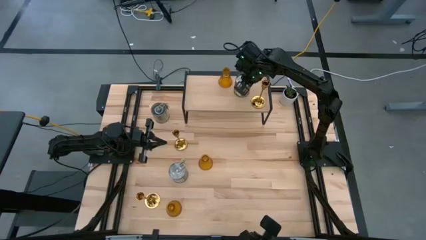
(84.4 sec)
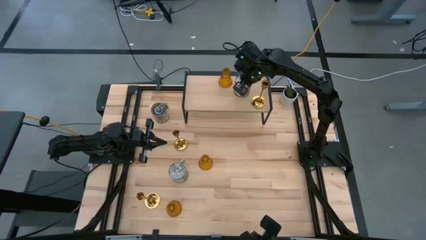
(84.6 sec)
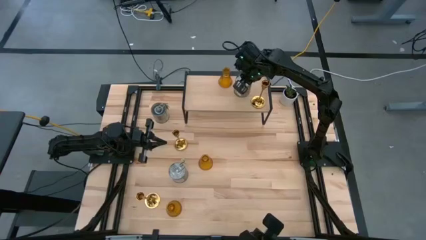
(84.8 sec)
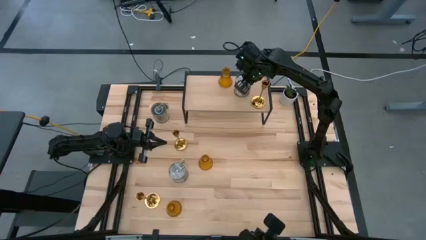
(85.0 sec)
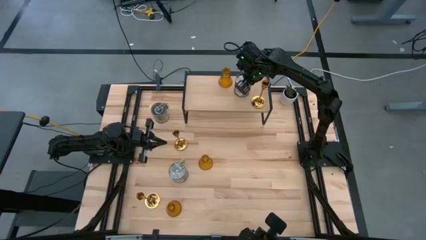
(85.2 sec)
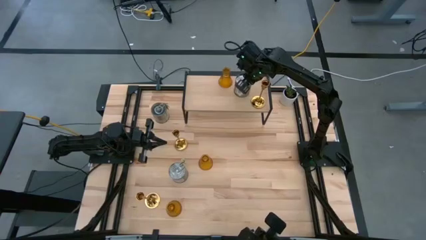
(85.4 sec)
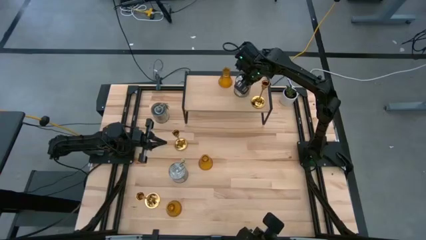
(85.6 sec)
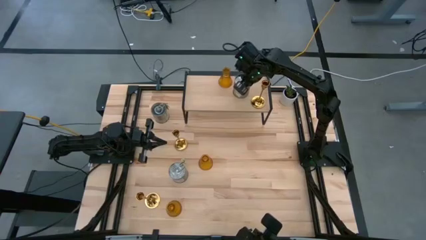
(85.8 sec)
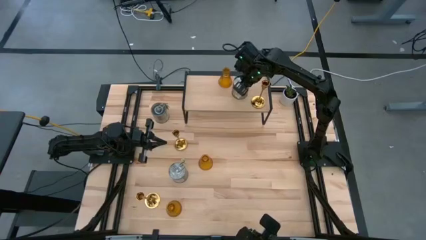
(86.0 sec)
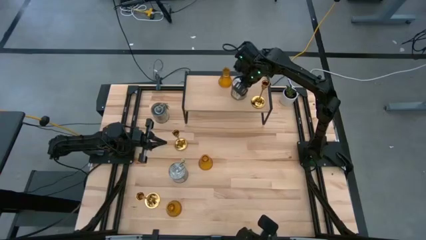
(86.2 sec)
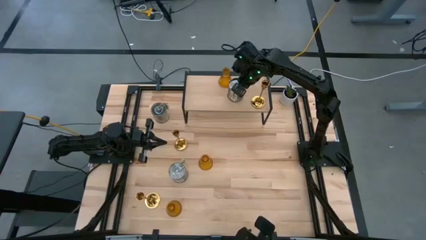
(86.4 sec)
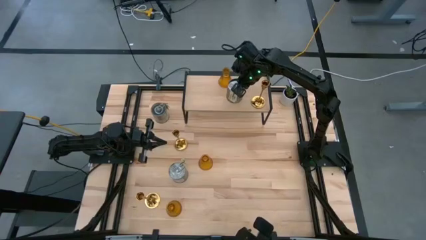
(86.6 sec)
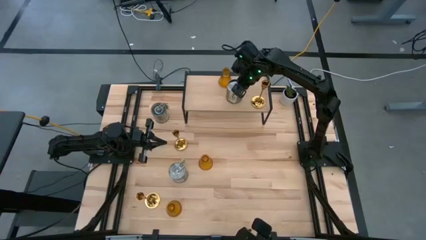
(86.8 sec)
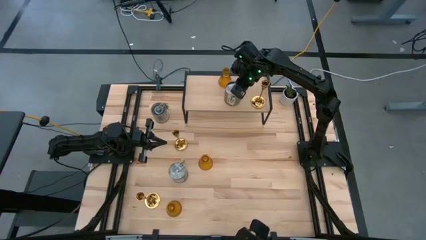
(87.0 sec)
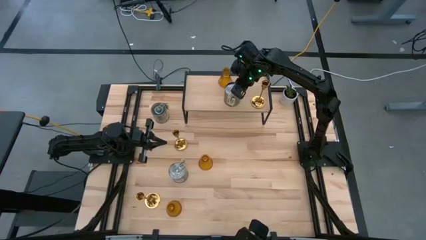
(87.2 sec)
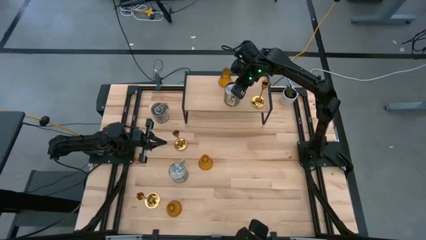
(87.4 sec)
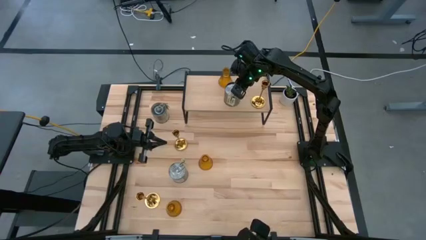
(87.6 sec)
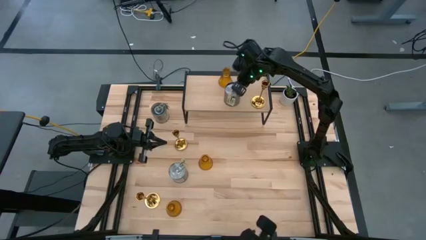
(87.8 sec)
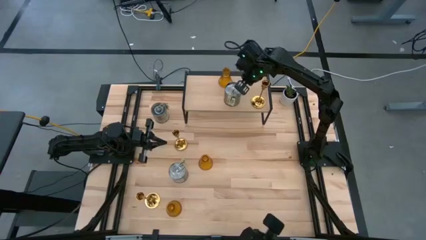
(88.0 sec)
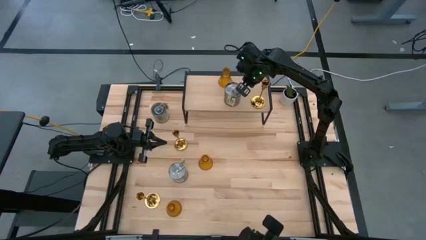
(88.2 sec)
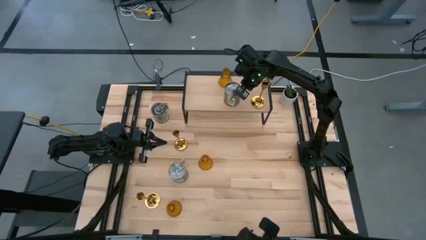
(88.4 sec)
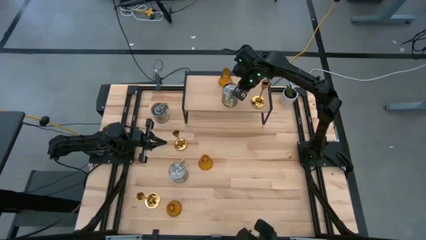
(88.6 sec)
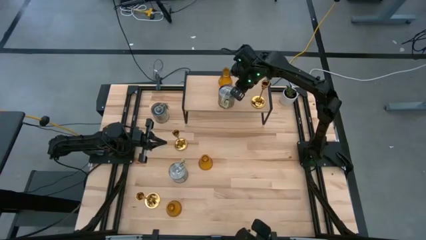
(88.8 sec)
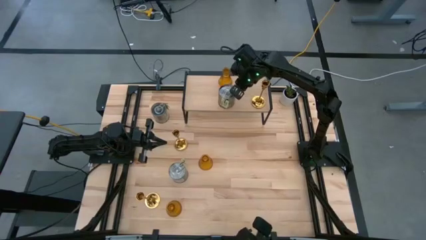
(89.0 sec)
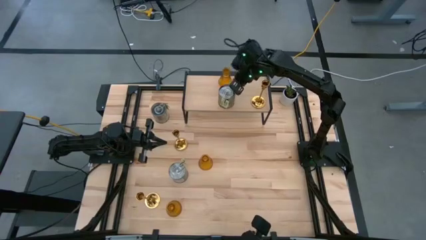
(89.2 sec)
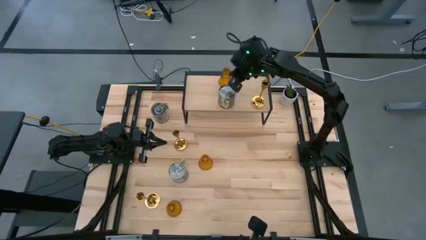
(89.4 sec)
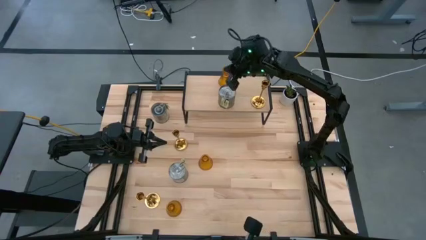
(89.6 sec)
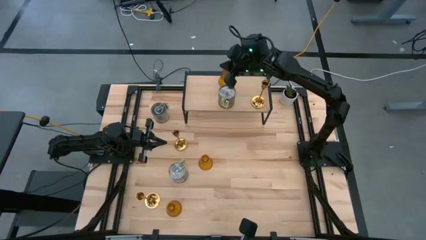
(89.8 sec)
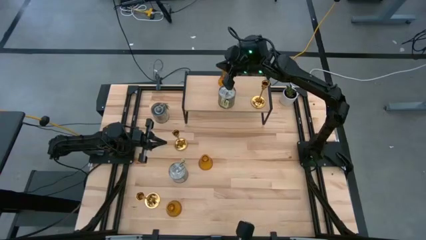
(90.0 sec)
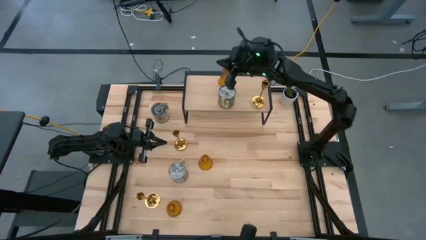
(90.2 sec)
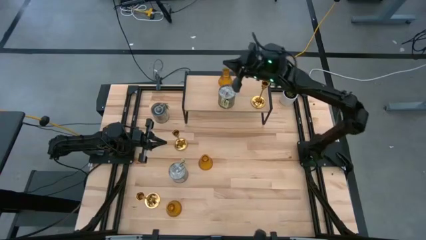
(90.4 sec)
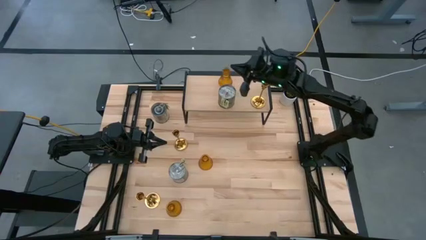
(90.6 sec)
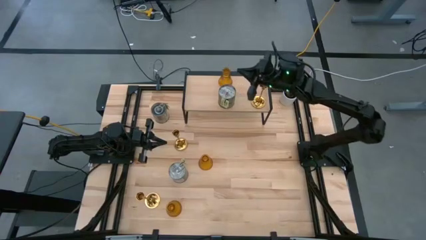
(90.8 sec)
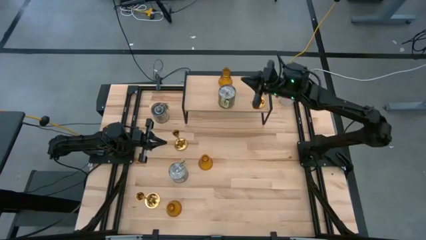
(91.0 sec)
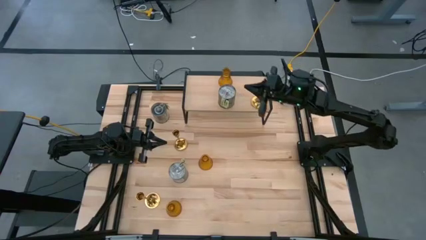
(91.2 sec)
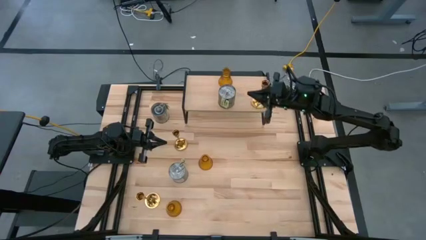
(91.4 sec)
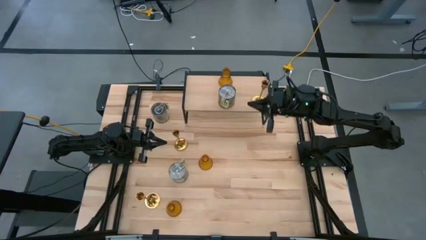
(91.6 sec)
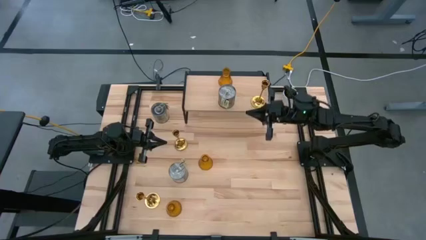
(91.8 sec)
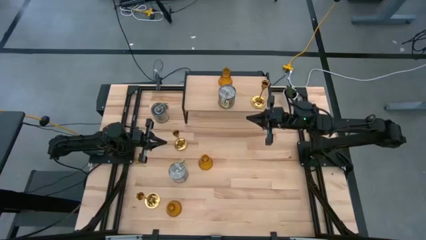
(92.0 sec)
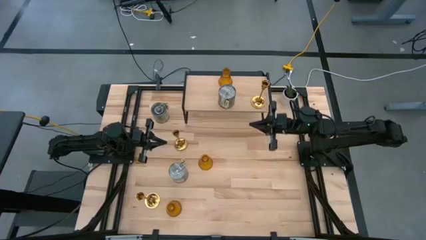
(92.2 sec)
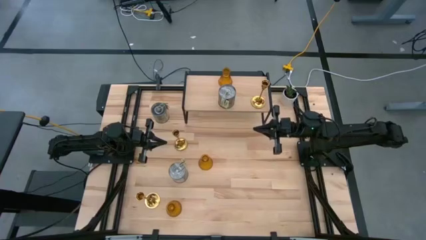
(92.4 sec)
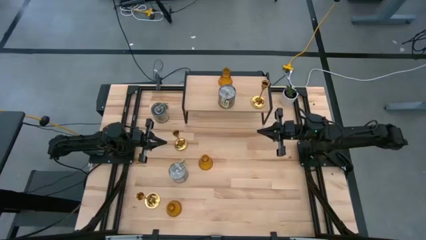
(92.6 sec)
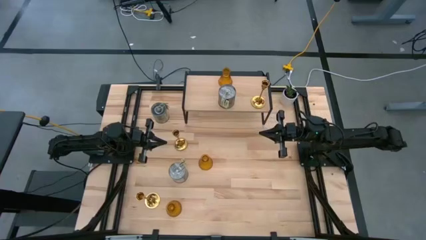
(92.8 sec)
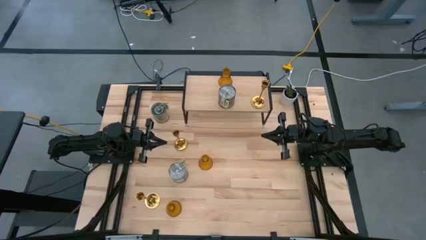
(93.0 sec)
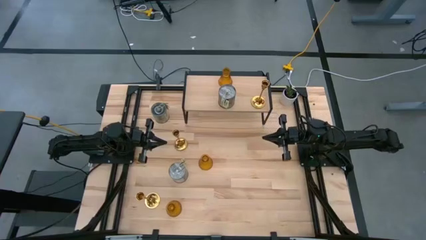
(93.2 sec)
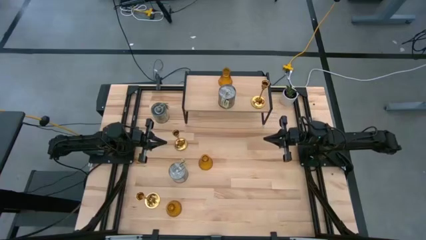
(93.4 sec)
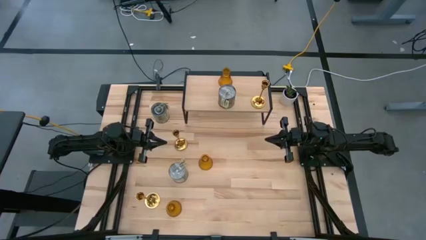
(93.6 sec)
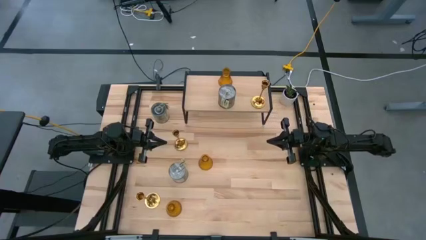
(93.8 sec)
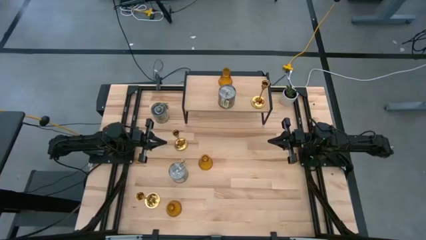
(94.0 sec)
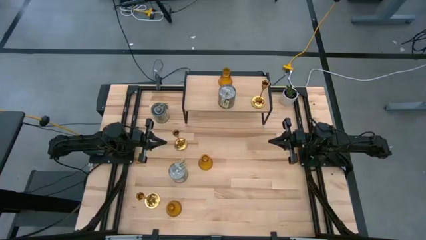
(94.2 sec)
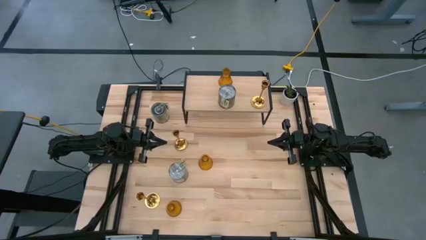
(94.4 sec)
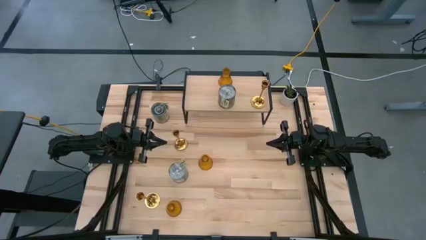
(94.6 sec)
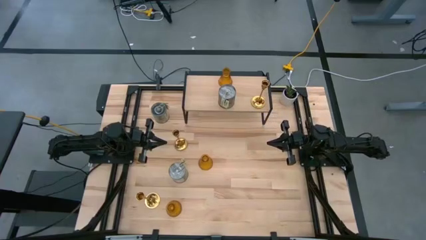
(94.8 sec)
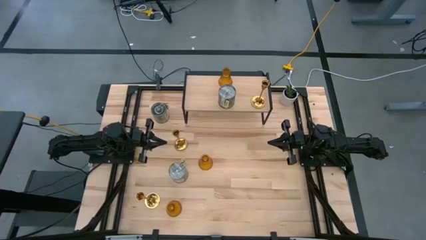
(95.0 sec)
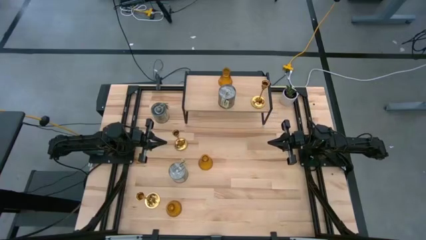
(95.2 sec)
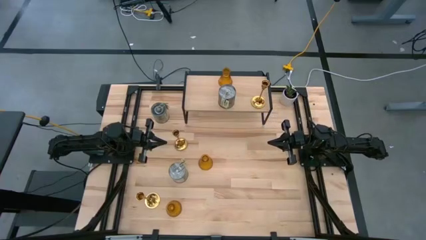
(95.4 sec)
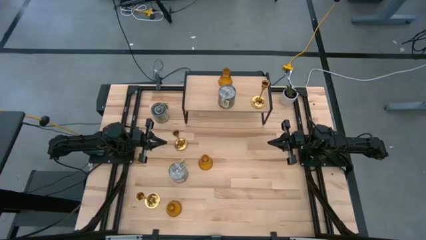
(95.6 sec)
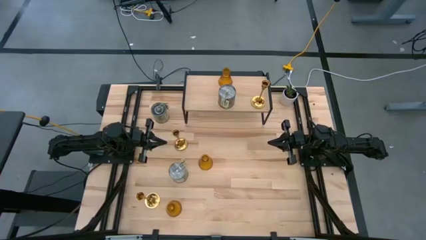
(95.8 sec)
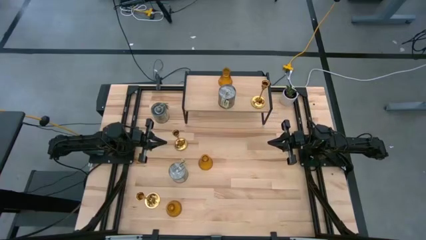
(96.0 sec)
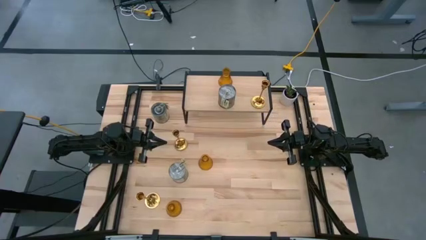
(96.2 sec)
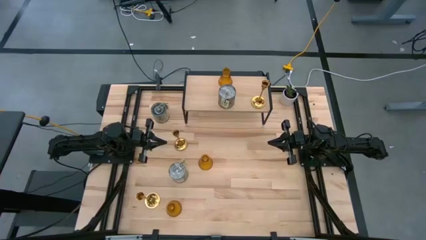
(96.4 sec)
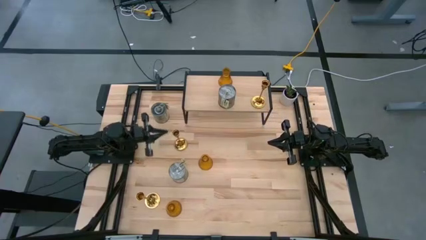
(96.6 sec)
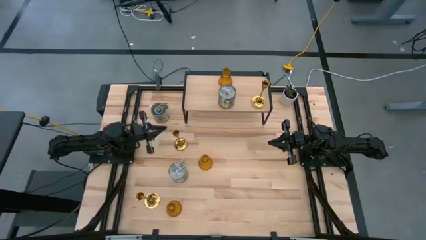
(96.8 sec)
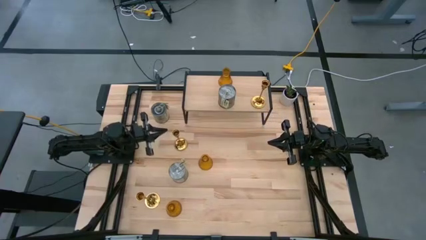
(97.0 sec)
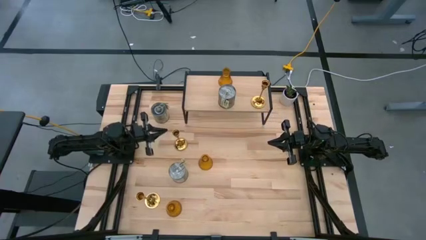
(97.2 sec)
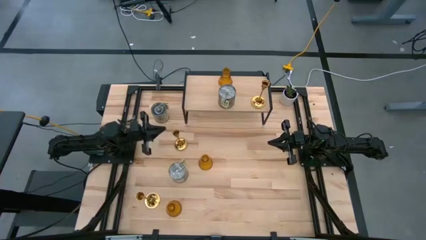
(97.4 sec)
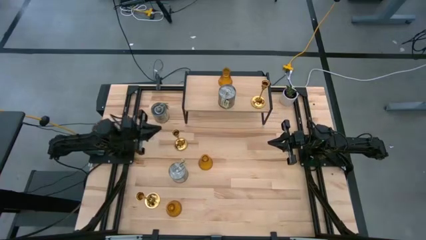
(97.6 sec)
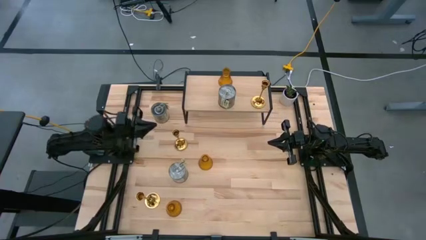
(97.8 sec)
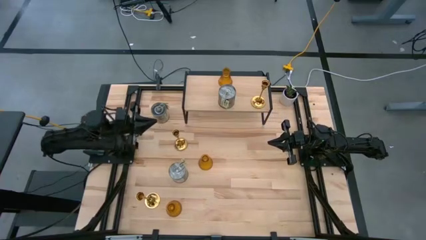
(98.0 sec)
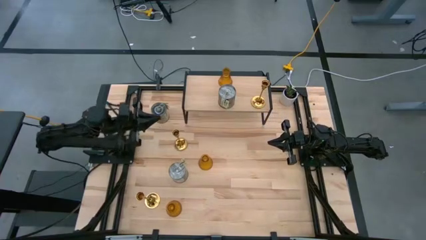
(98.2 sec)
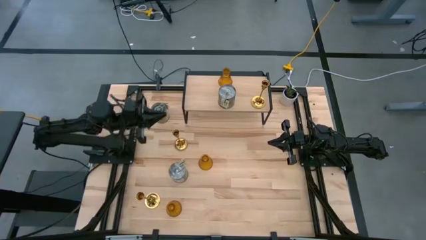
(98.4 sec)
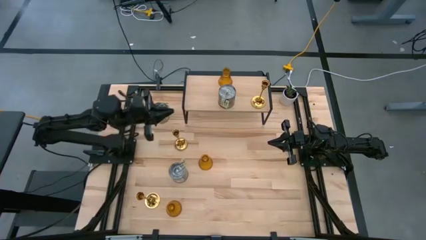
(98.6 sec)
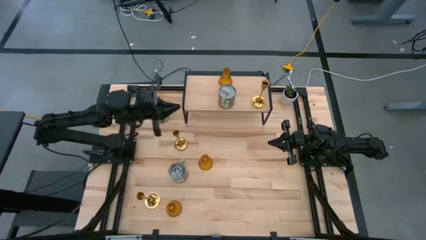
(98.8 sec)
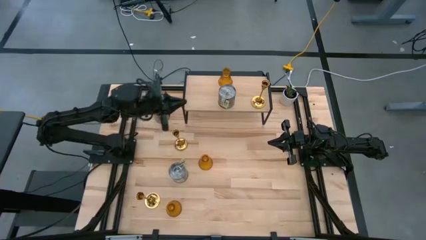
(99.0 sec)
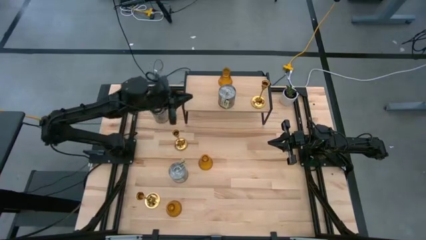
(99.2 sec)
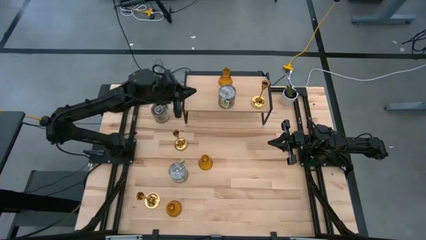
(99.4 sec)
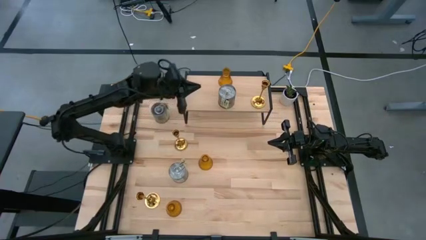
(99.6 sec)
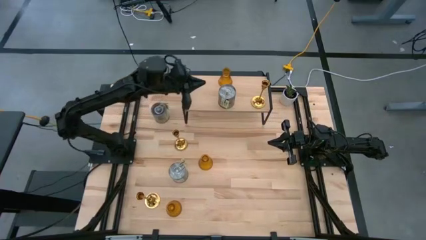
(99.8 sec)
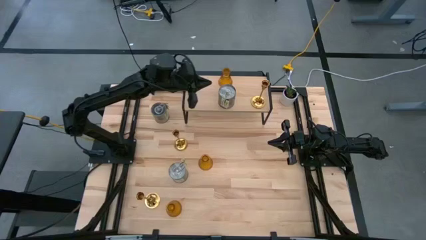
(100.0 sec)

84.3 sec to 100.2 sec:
Task: Pick & Place candle stick holders
Adjust the scented candle on the shelf
